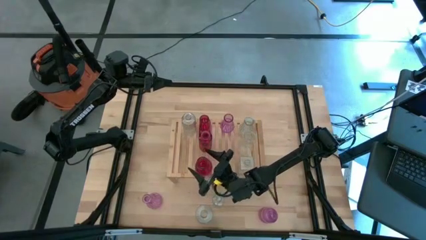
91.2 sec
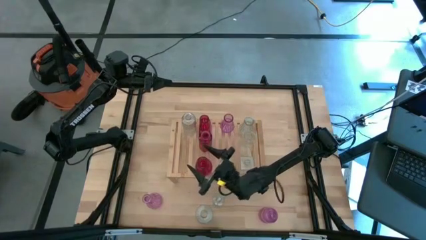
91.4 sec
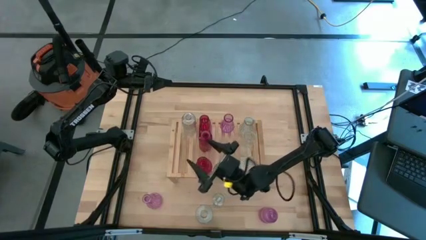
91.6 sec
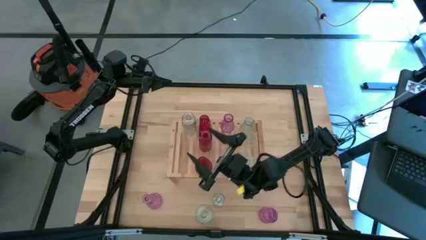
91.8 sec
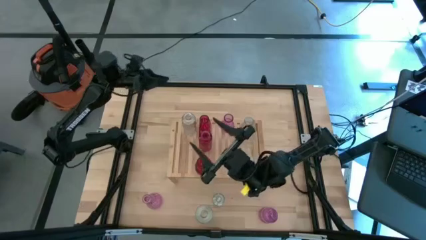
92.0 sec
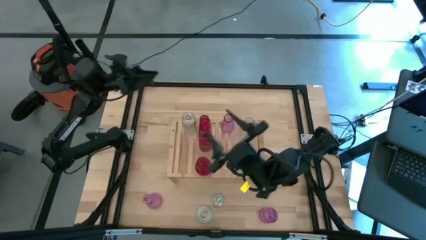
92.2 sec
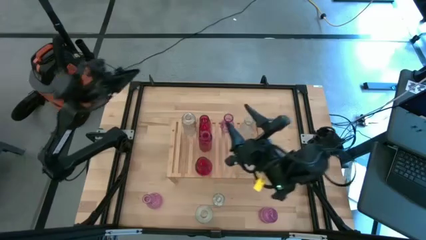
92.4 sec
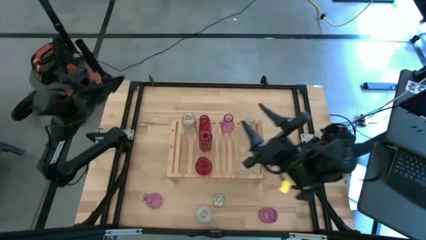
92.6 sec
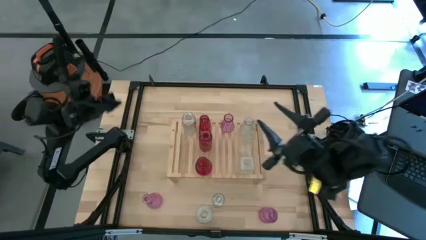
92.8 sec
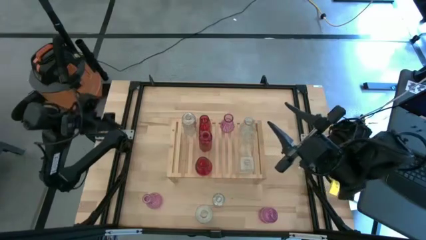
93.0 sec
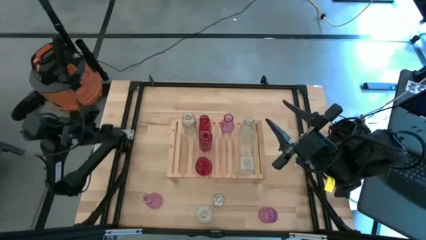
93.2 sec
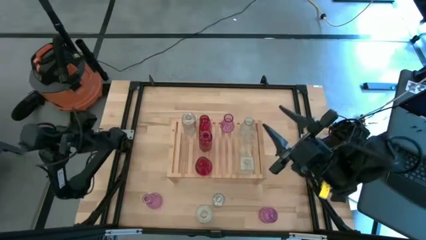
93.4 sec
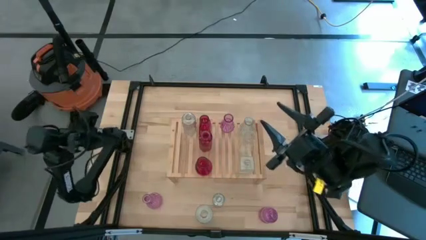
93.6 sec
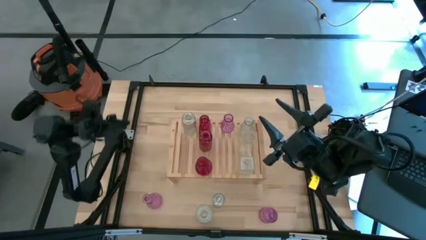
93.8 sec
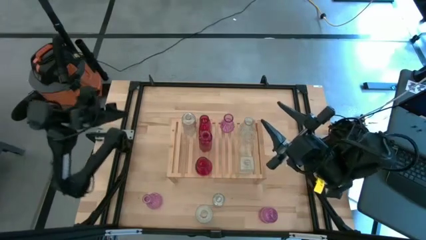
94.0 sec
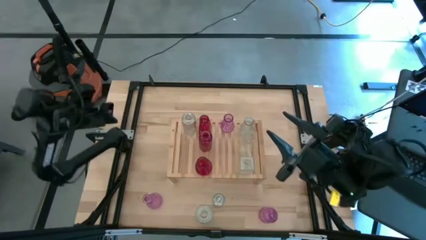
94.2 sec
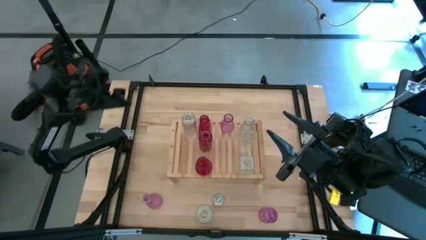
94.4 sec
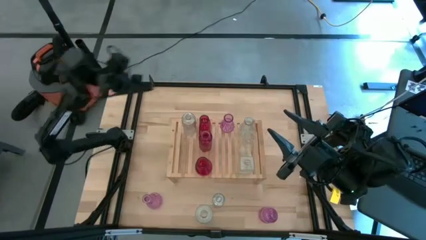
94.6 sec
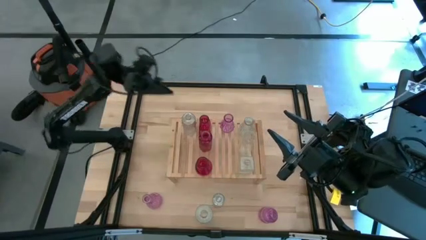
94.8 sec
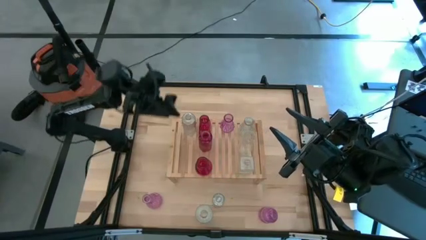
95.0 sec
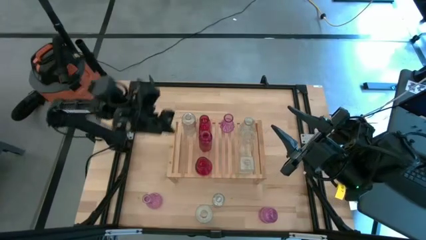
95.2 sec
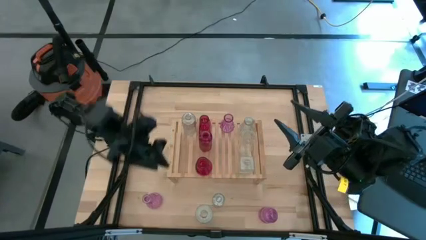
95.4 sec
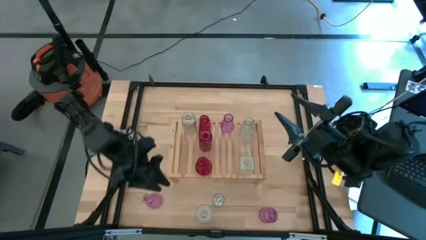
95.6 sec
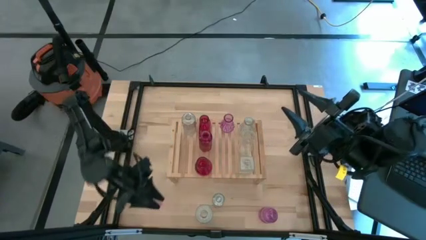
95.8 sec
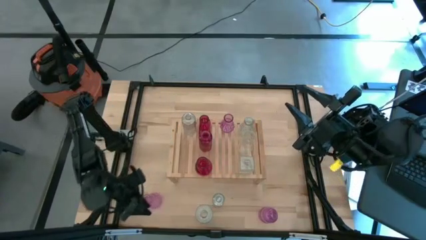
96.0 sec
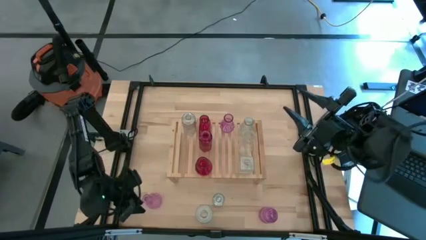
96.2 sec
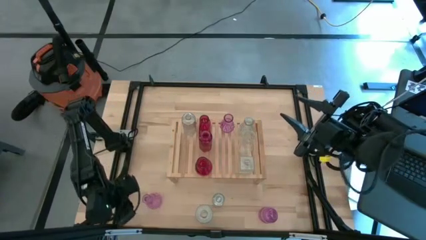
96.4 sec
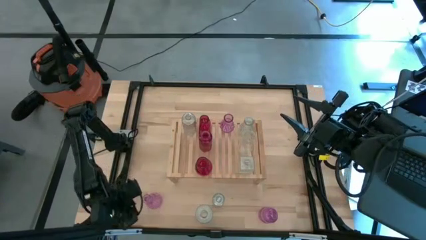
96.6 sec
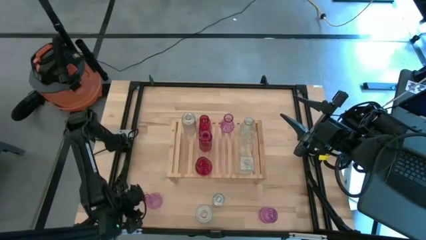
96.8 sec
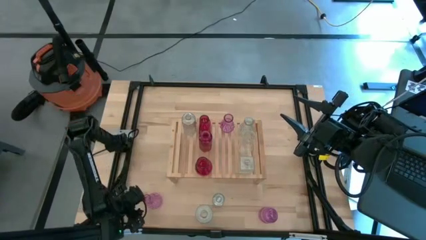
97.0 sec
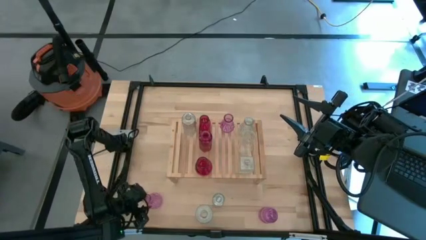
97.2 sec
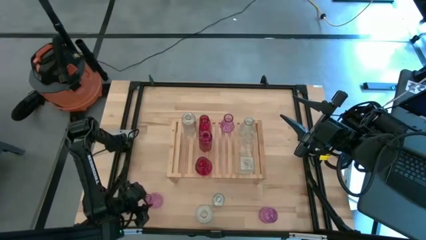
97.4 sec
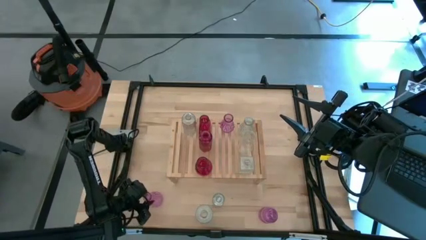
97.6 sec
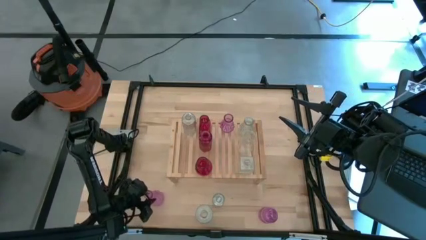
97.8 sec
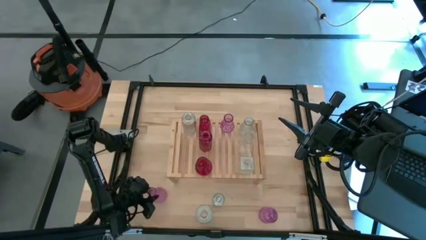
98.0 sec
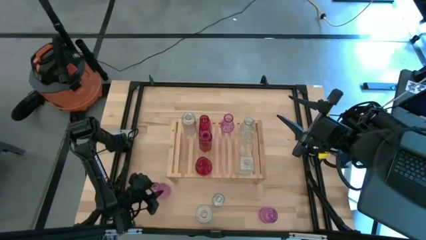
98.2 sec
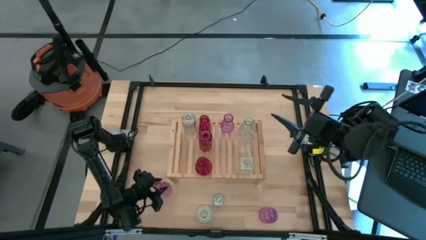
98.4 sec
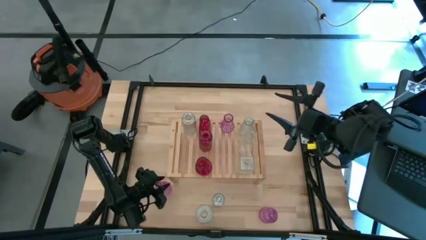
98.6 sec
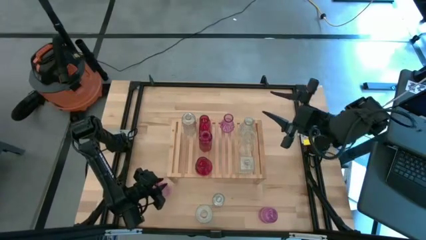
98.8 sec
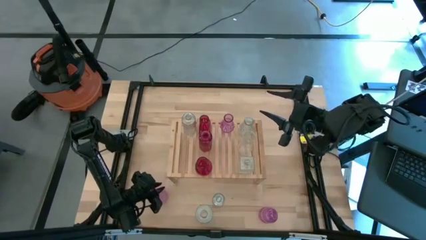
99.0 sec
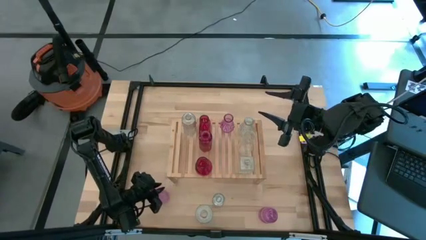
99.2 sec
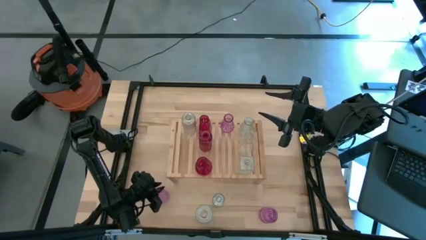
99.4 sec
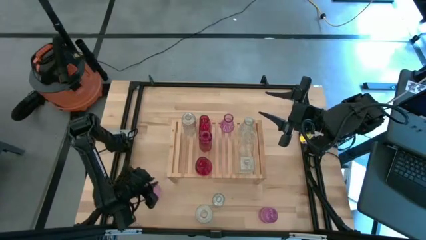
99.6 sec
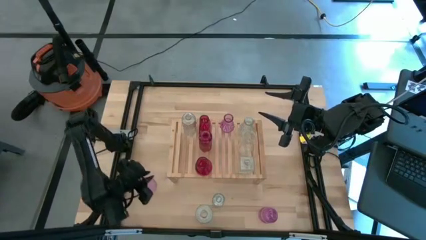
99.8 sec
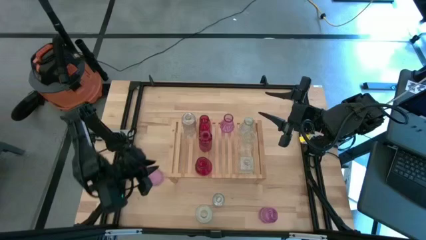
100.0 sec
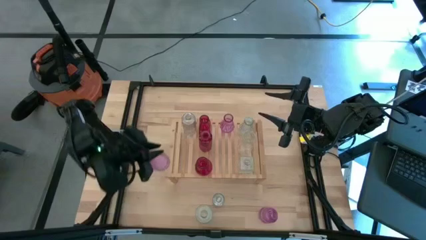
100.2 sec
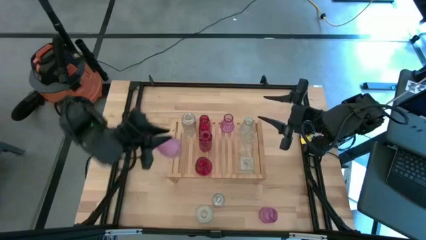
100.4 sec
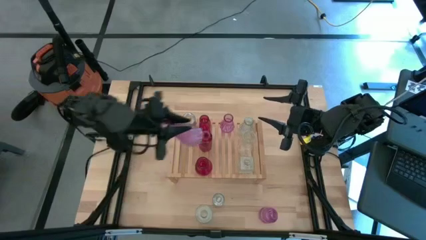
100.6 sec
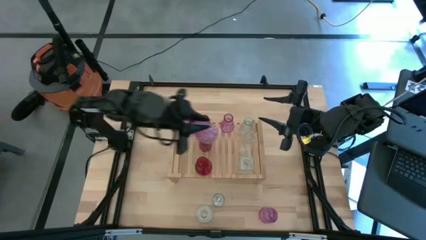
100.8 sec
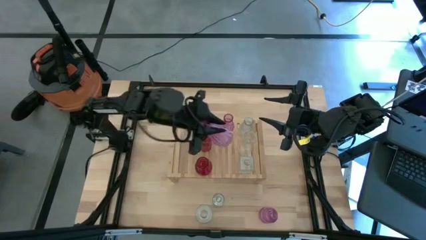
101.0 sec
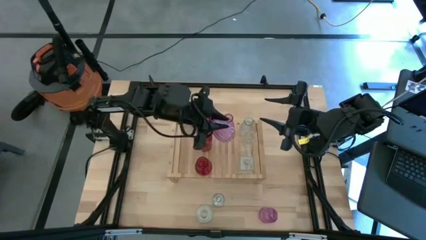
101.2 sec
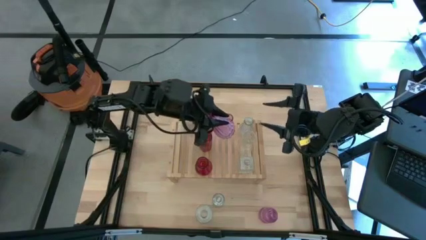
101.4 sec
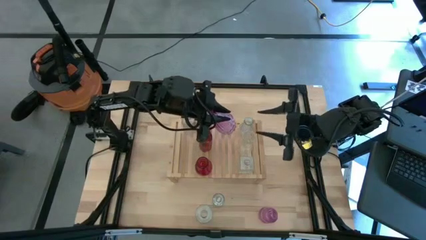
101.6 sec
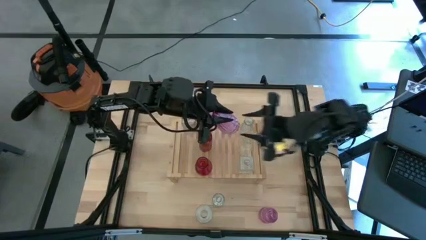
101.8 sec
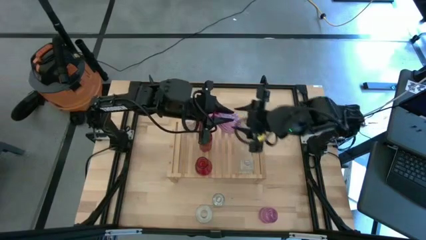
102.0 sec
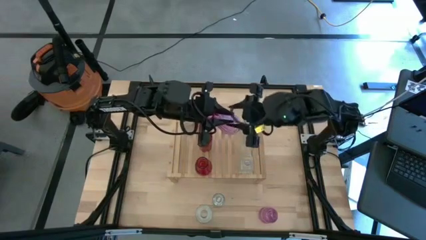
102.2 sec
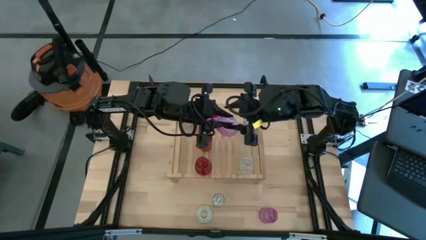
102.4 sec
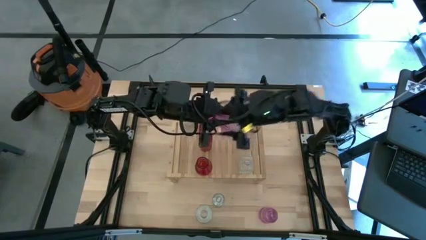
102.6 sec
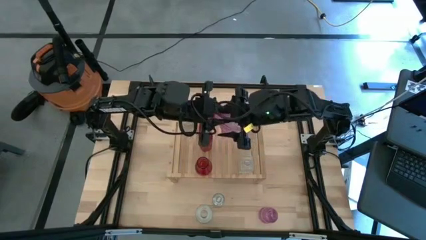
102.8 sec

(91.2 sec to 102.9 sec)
Task: sort vases onto shelf
Put the violet vase on the shelf aligned with the other violet vase

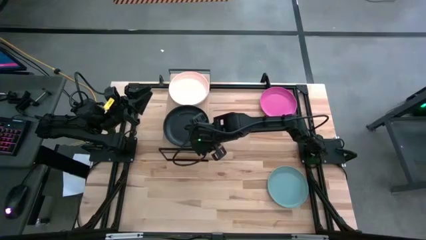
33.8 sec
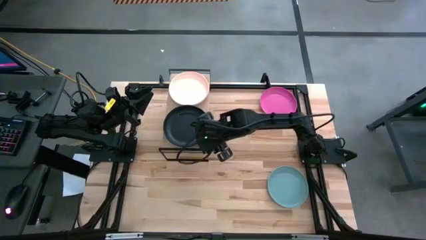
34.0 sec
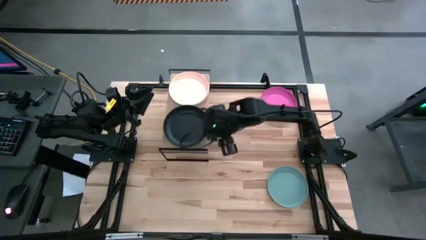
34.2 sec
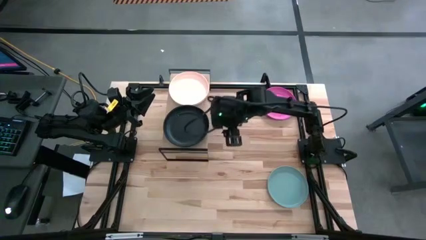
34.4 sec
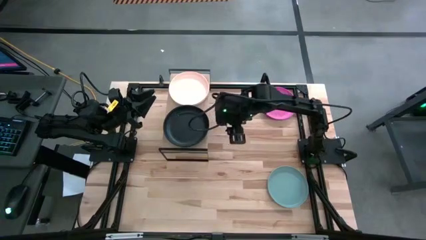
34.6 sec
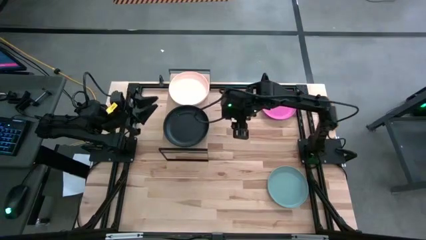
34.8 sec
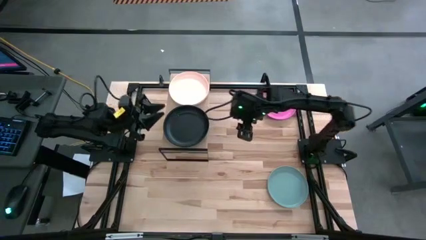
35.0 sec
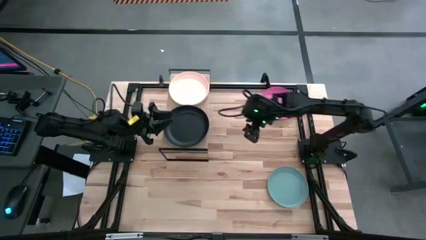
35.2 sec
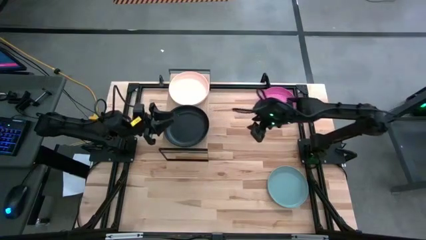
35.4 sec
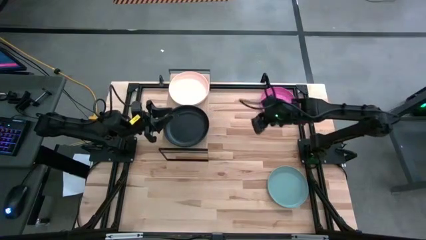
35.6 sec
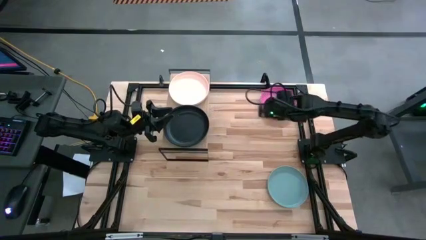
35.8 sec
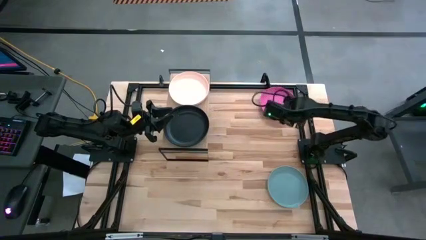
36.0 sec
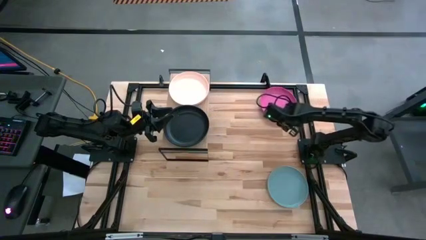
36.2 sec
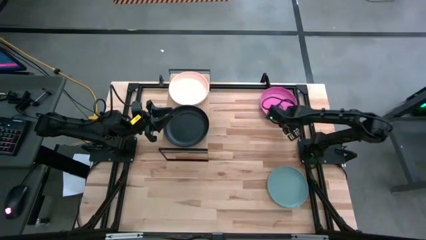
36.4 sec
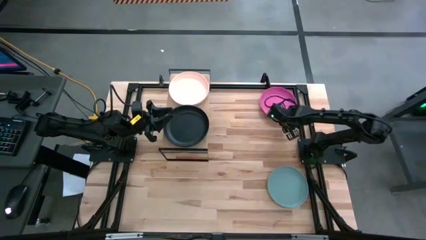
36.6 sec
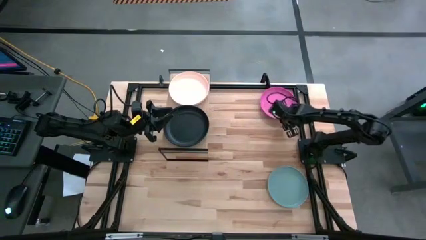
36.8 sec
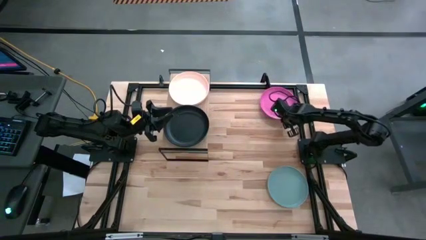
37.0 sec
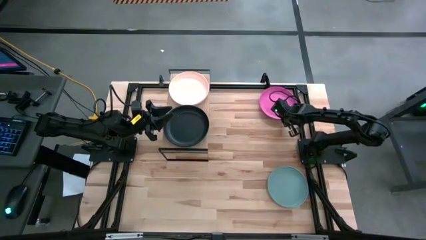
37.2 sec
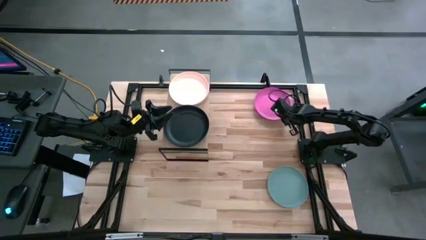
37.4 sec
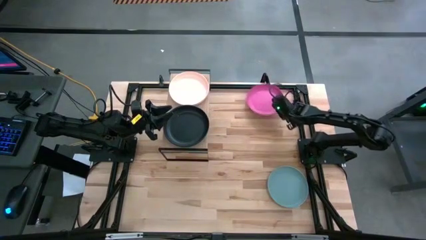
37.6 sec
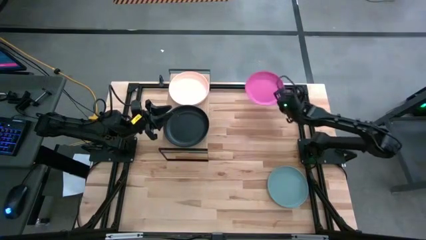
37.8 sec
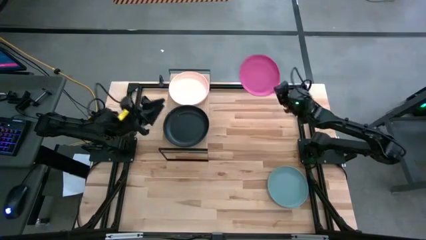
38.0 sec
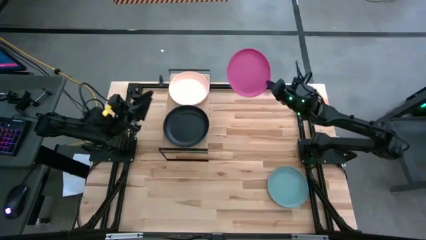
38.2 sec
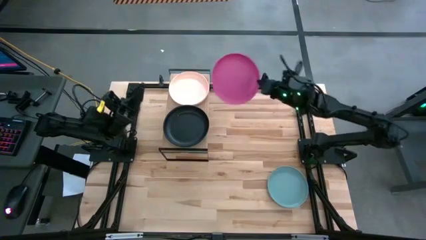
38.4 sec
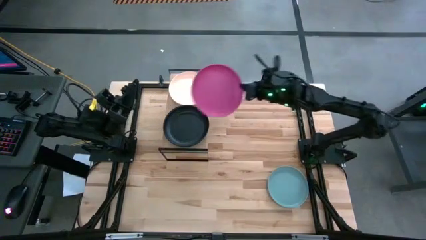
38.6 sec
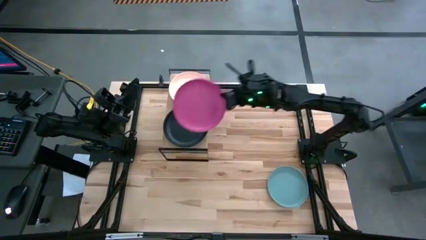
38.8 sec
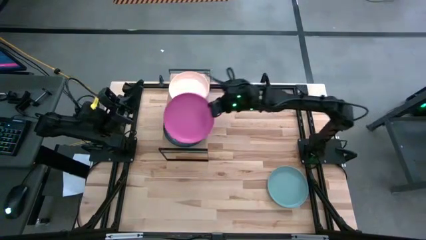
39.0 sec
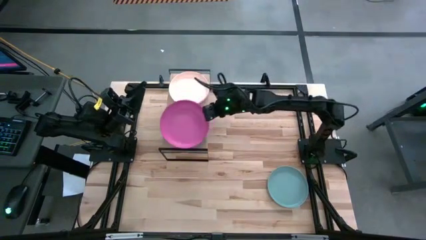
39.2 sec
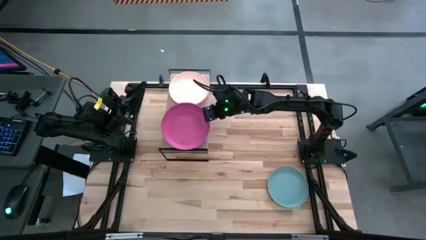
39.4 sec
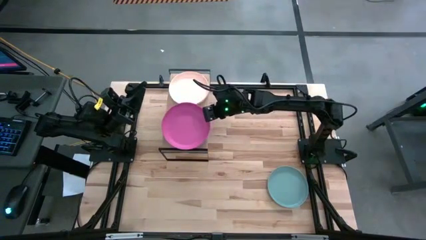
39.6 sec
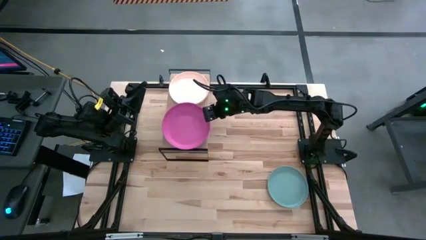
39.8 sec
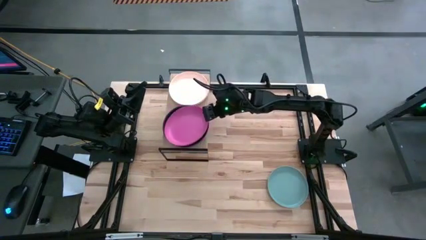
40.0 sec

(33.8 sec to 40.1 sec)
Task: Place and stack plates onto a shelf
Stack the pink plate on top of the black plate on the shelf
